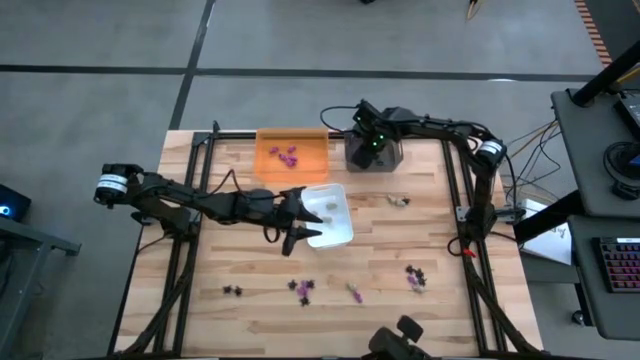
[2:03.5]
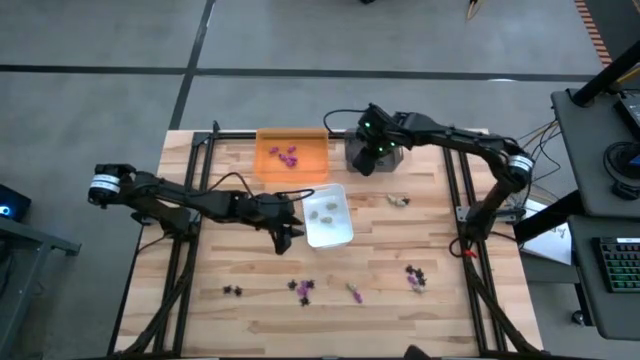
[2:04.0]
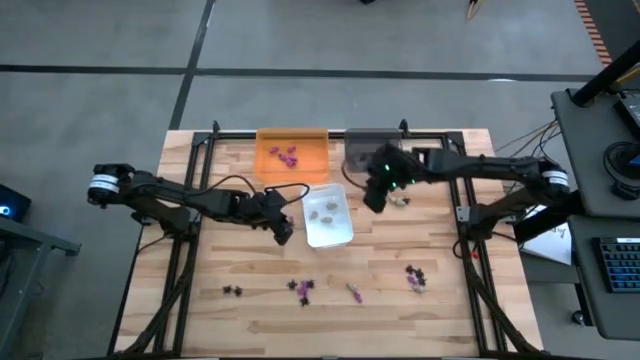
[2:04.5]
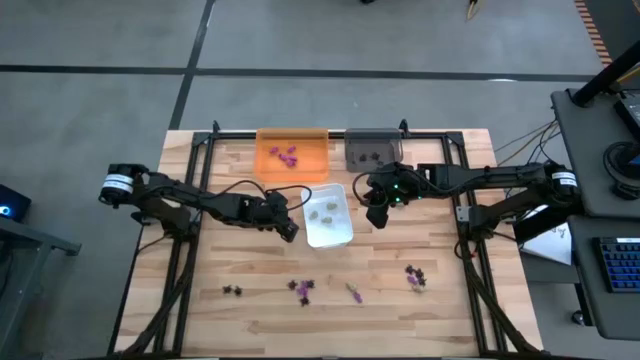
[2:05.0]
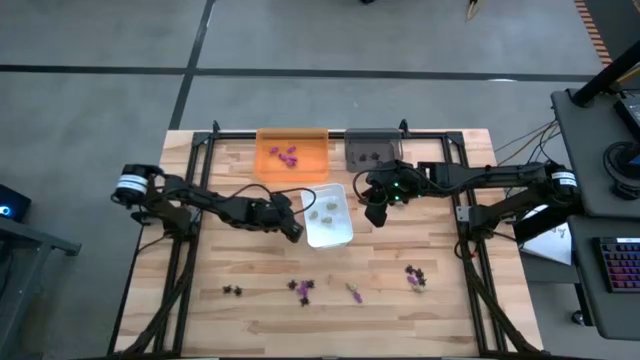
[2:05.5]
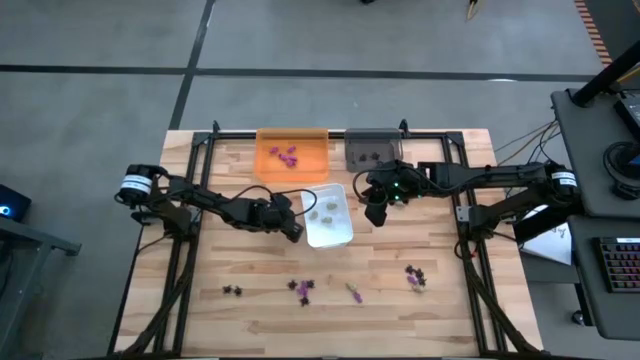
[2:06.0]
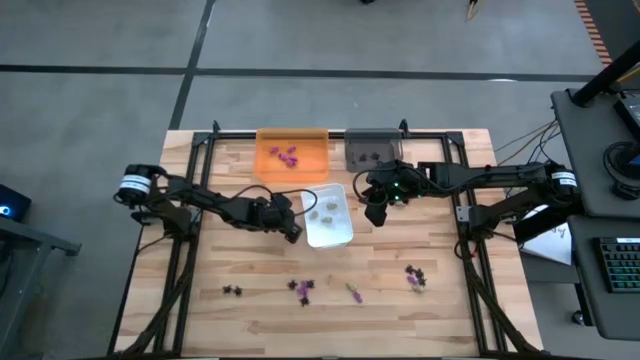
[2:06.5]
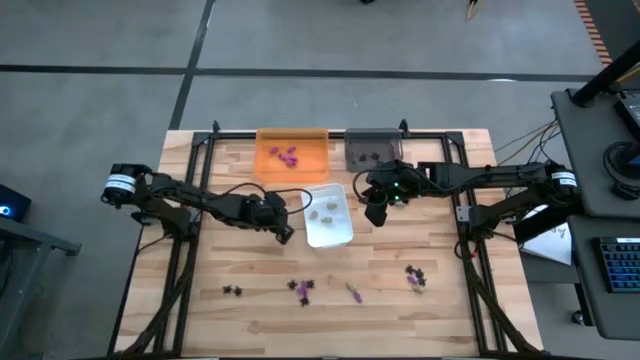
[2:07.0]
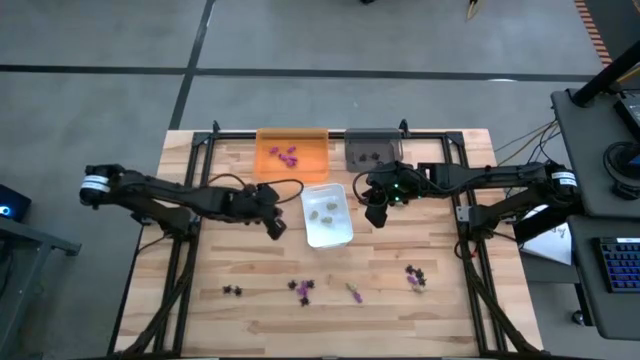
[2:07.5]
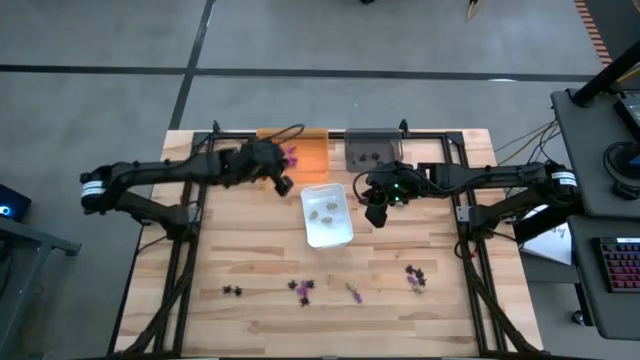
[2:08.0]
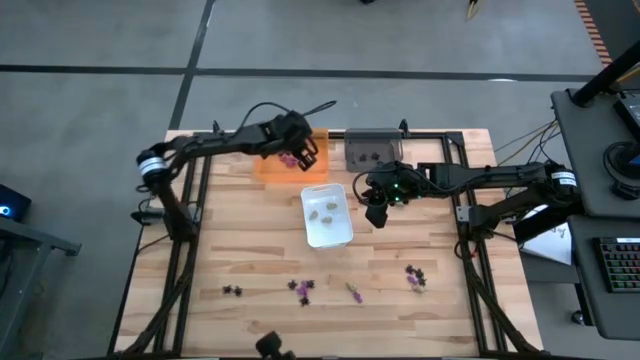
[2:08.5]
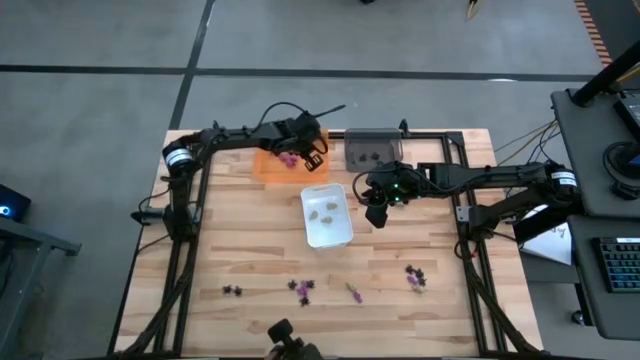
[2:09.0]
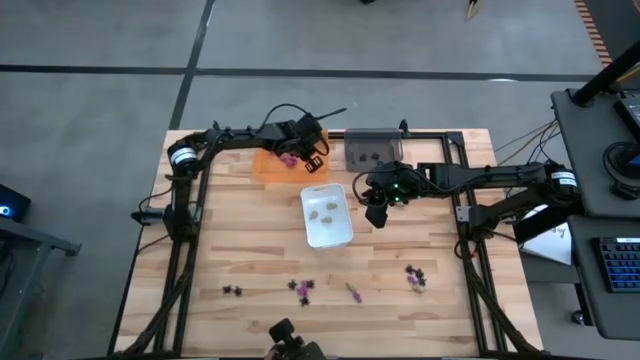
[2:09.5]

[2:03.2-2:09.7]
Task: Sort Halloween decoration
Put the purple skeleton toy into the orange bin

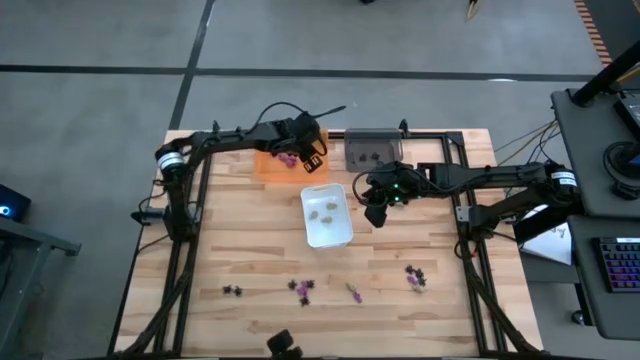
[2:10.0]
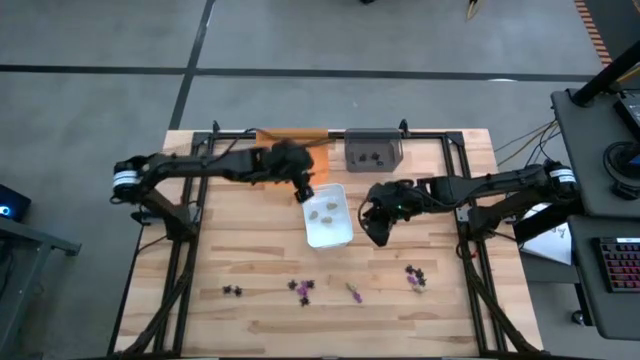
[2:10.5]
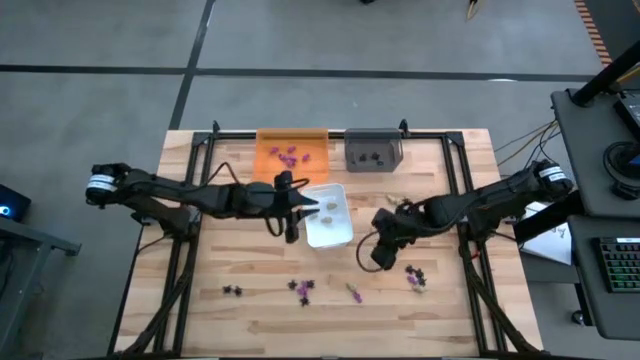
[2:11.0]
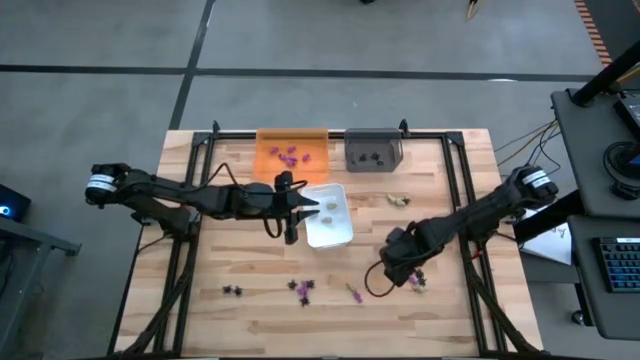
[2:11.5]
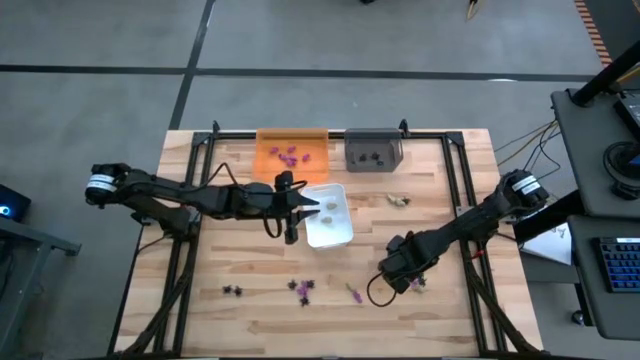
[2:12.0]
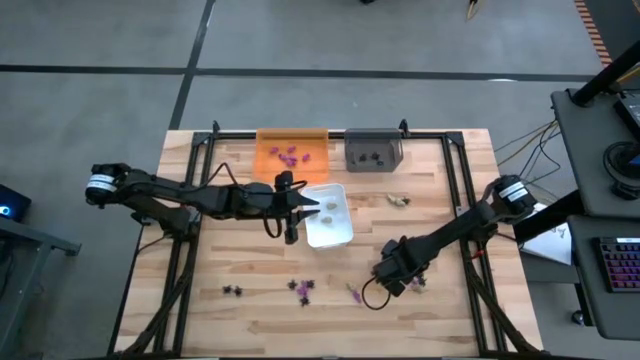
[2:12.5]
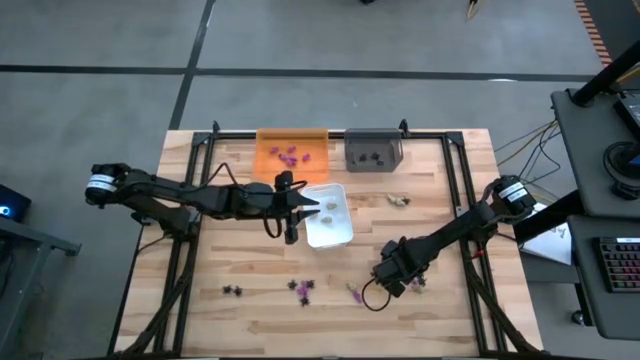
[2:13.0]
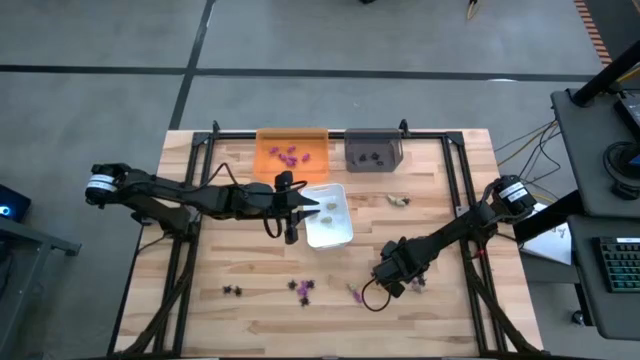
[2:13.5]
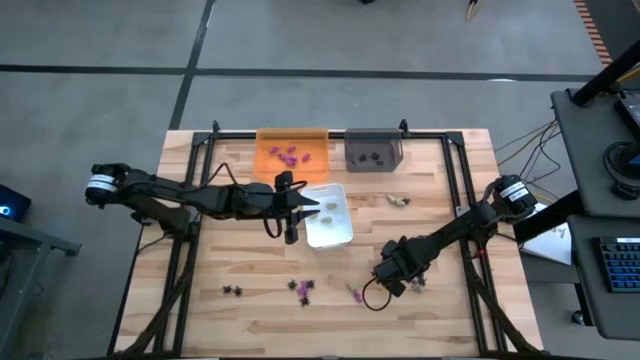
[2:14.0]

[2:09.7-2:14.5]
Put the black spider toy into the black bin

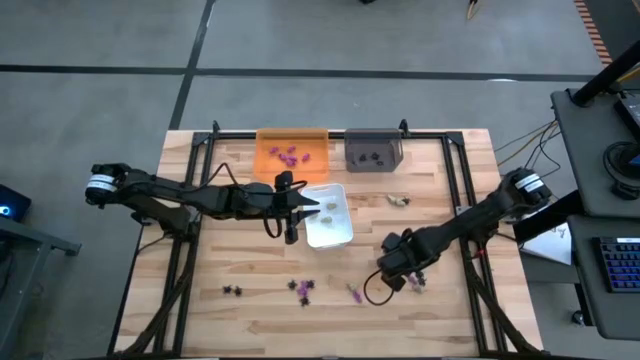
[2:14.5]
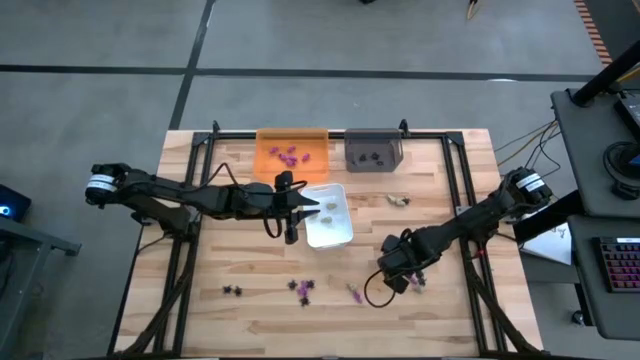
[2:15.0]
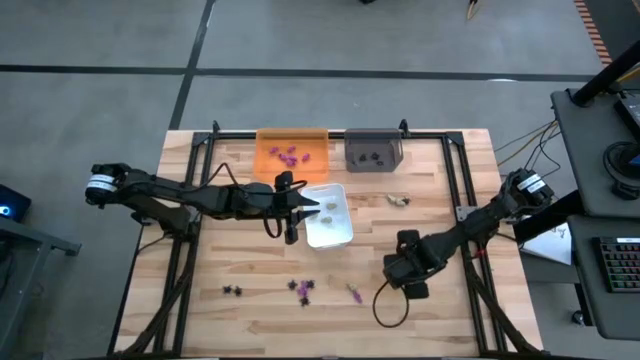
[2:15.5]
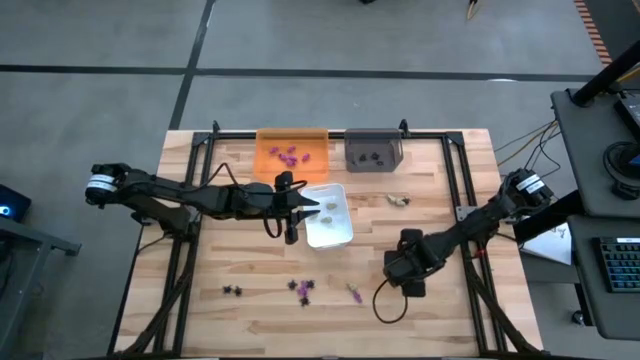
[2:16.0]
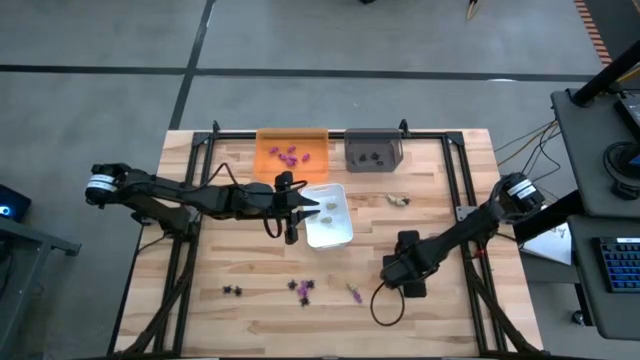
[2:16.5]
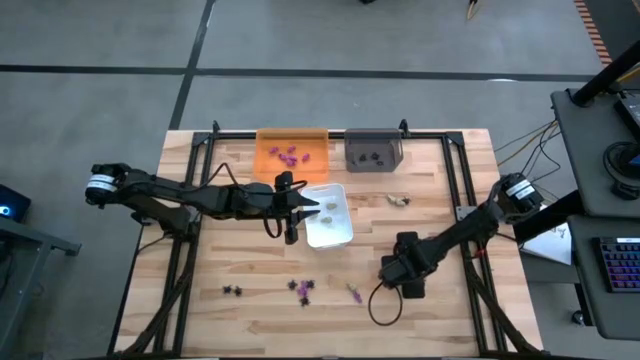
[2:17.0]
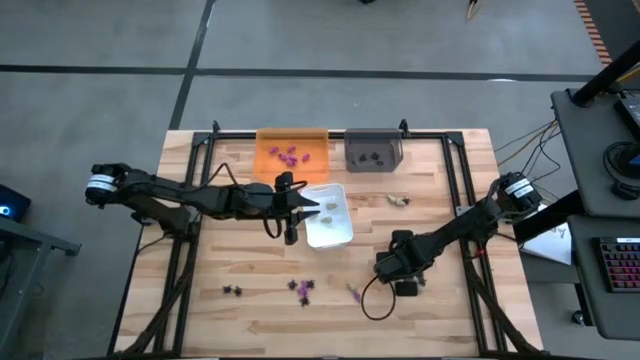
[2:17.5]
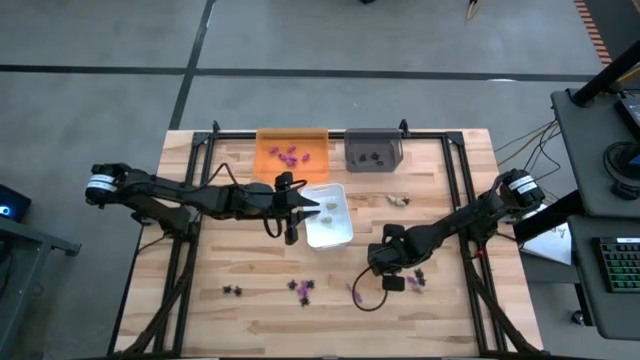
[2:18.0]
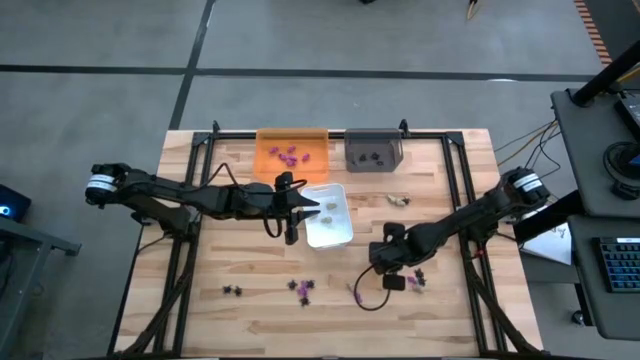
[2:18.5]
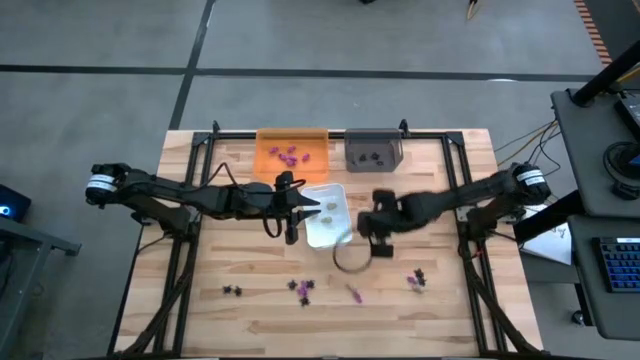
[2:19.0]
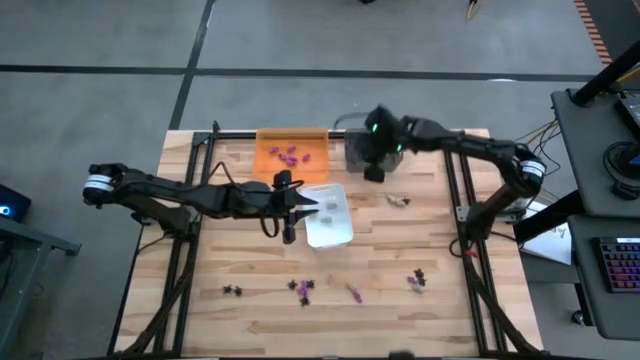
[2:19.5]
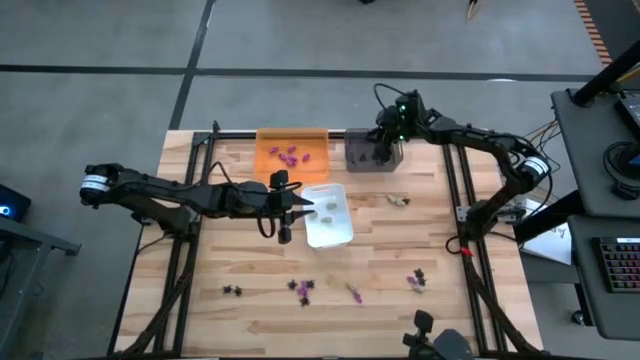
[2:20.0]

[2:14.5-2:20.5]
Put the black spider toy into the black bin

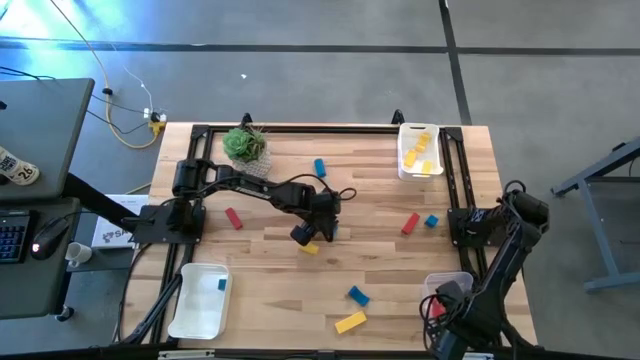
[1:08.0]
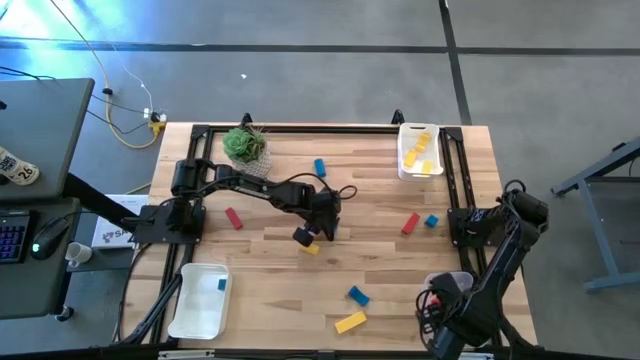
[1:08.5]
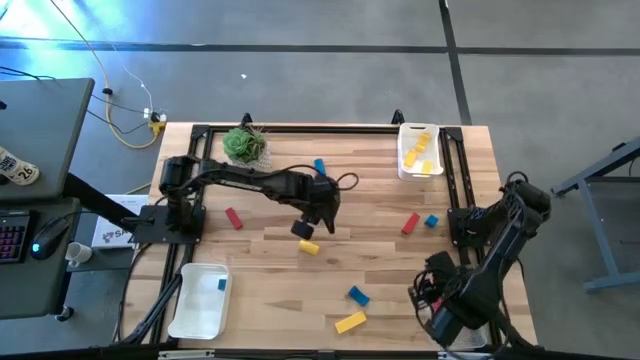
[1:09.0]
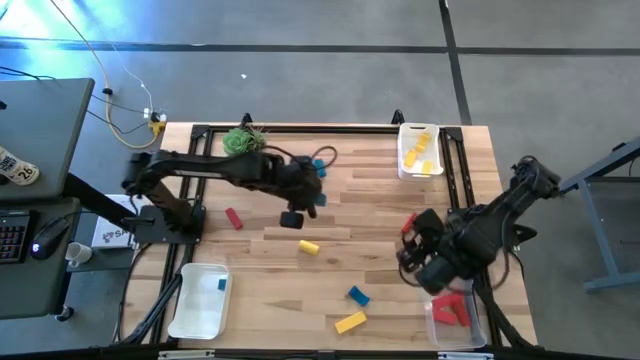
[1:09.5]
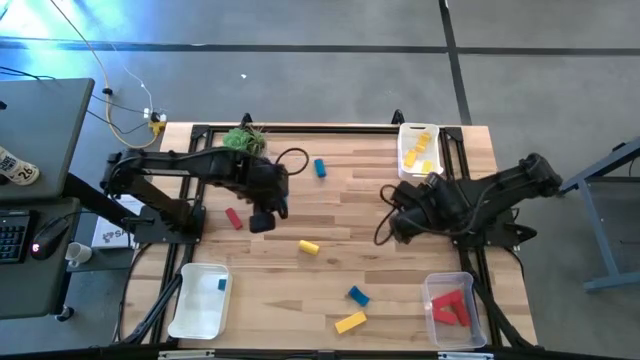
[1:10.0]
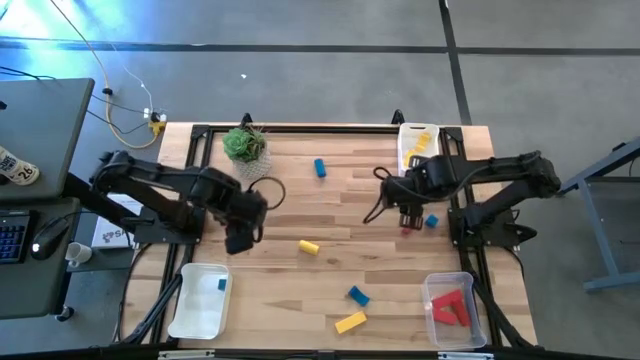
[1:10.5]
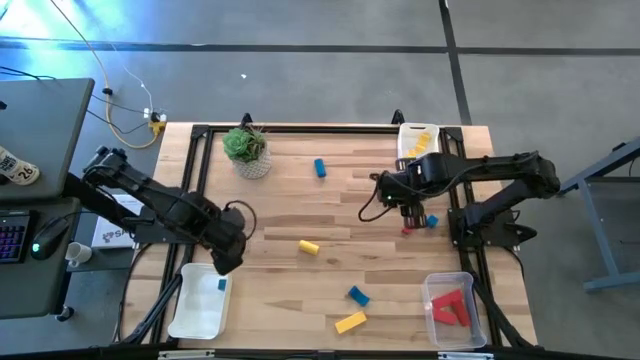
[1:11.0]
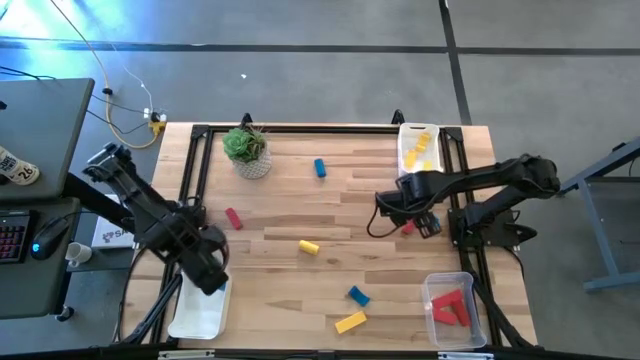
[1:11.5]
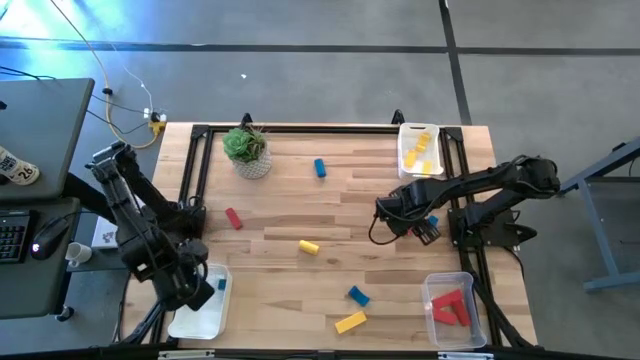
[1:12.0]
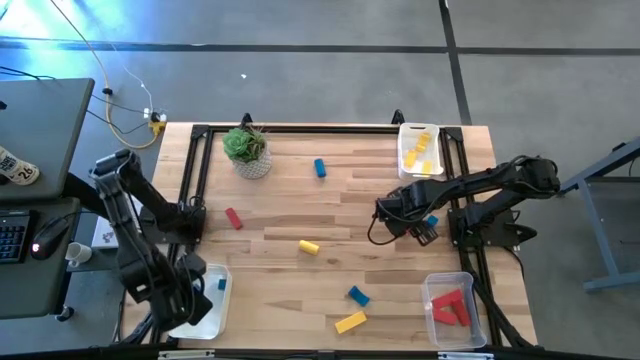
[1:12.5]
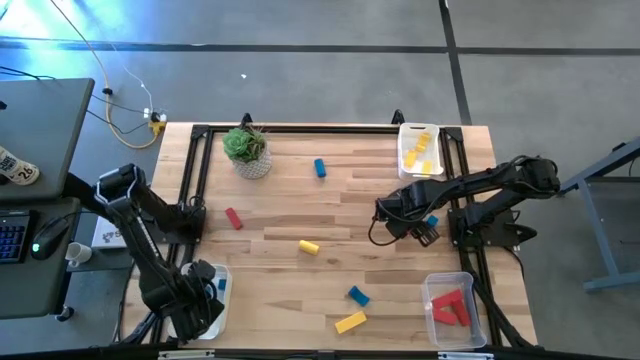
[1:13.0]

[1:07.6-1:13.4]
Task: Sort & place blocks by color
Put the blue block into the bottom white bin
